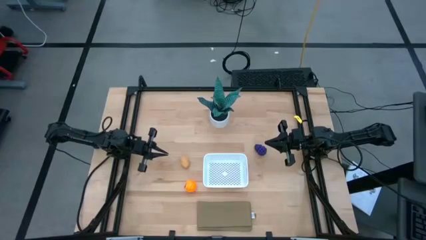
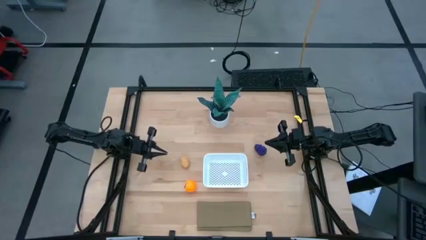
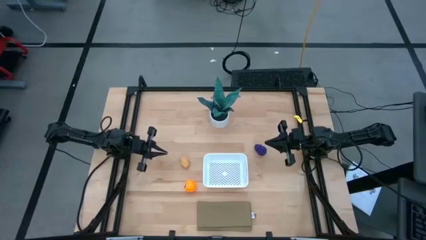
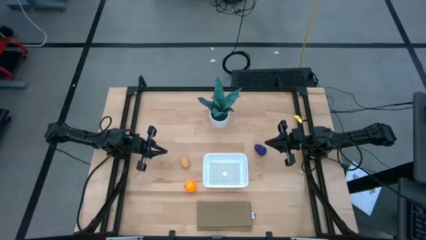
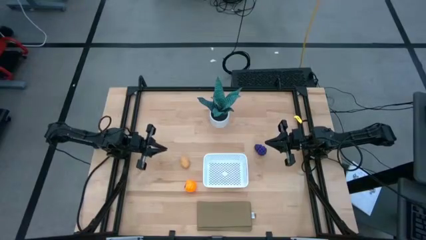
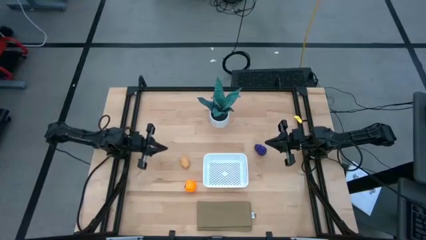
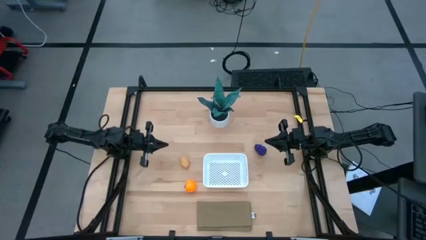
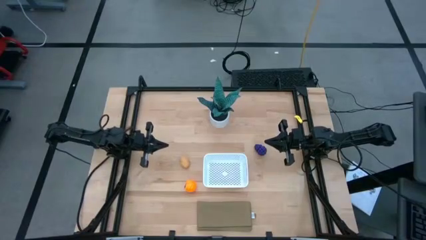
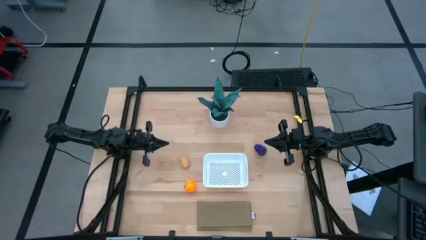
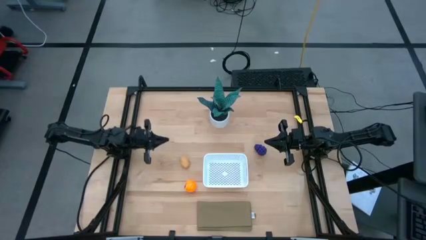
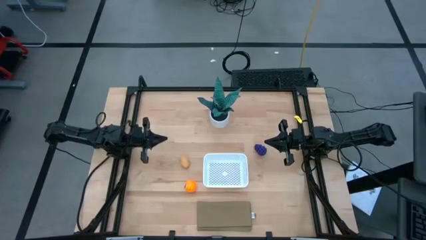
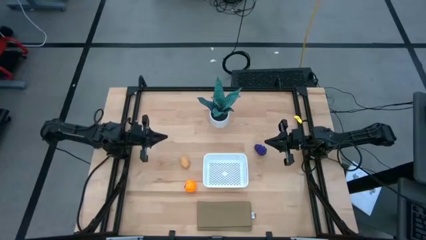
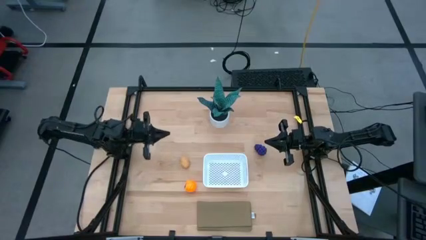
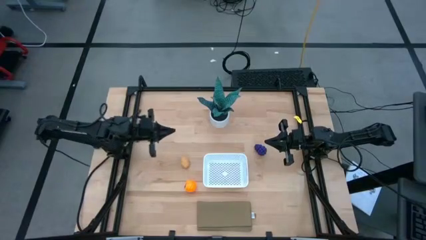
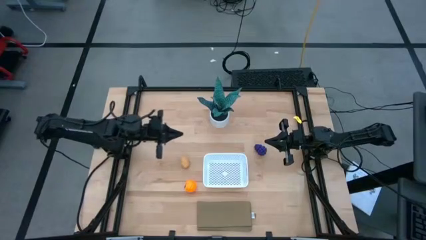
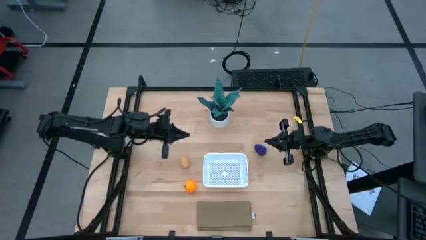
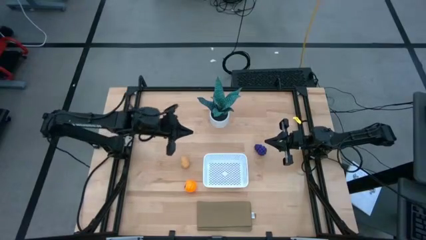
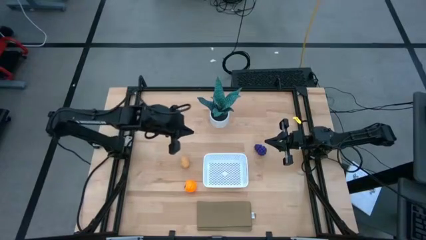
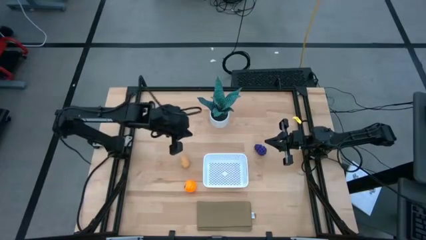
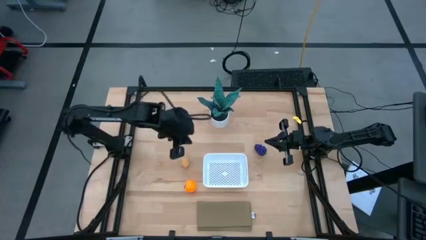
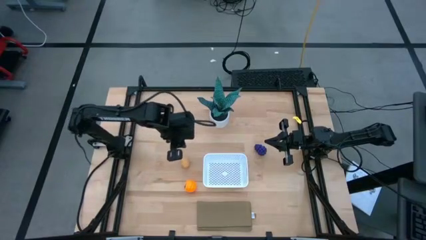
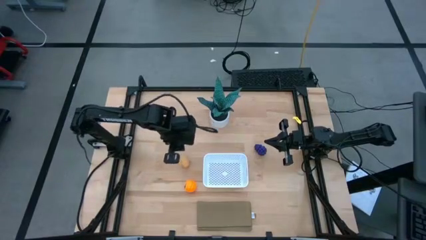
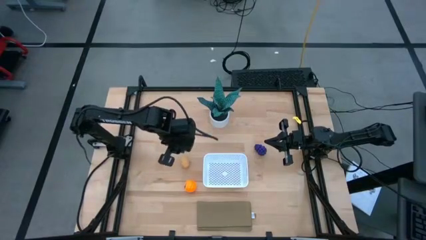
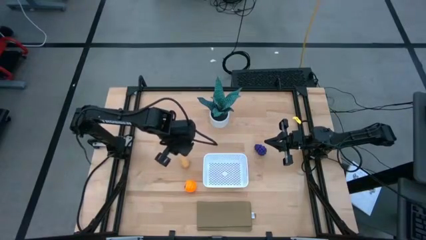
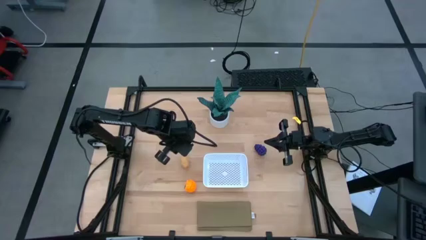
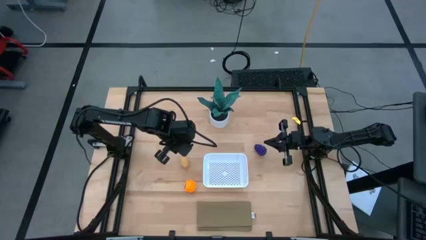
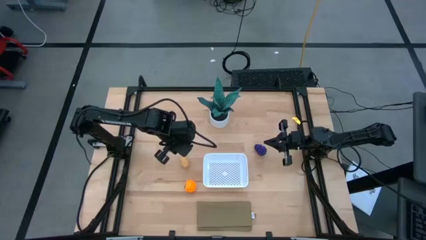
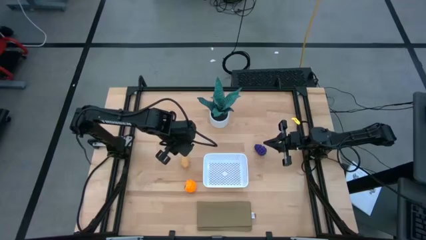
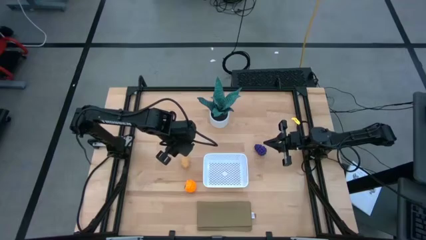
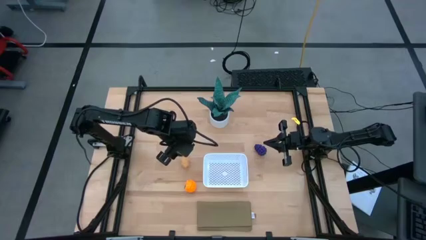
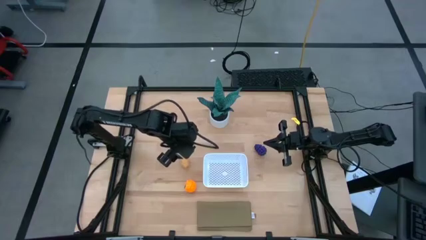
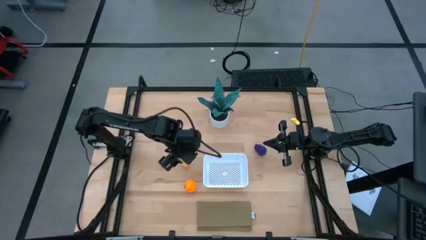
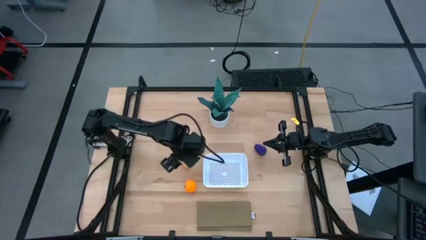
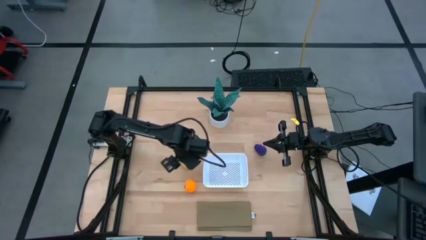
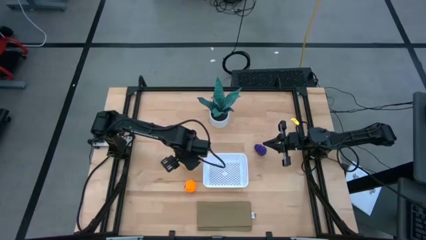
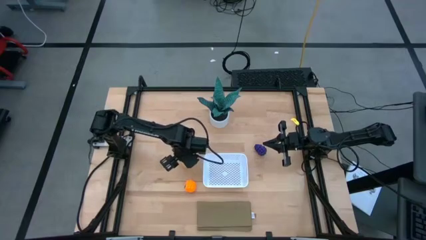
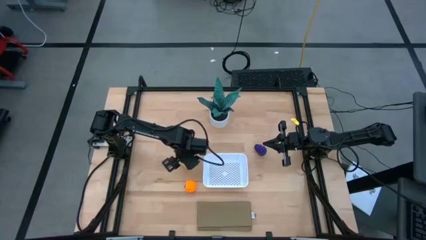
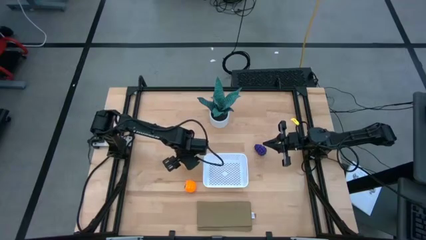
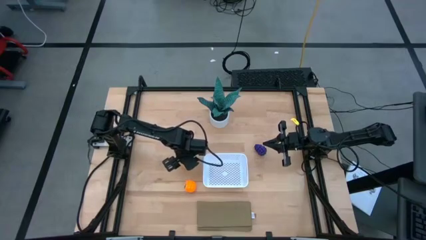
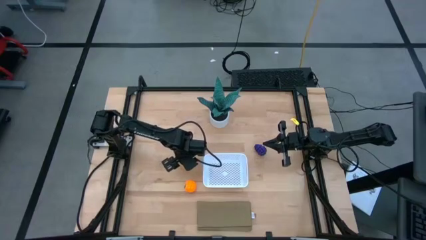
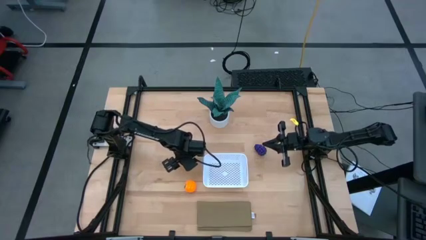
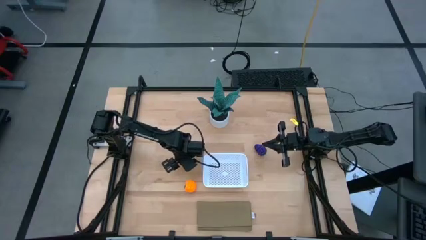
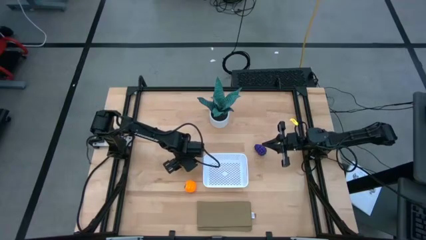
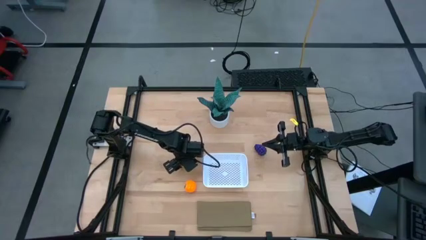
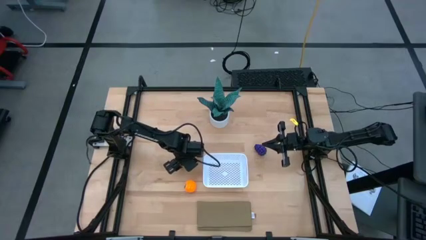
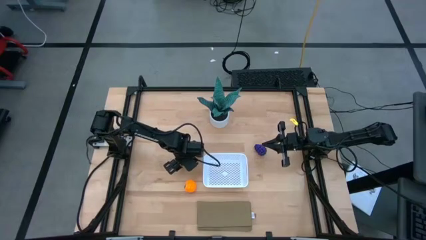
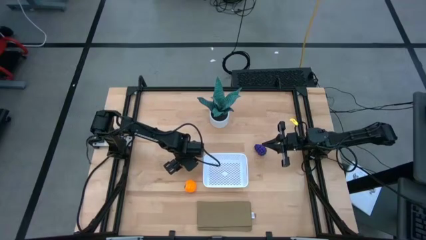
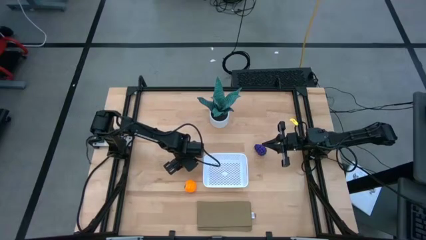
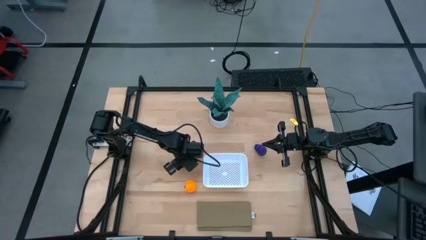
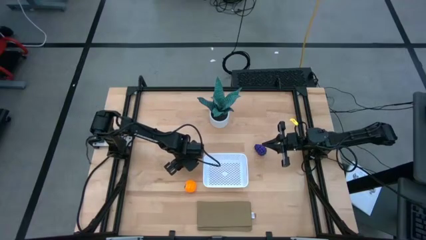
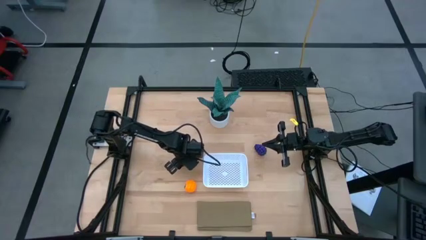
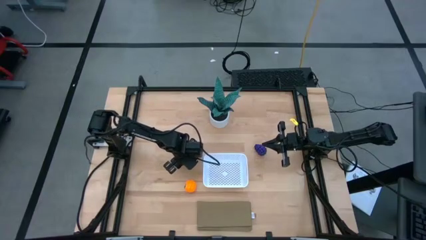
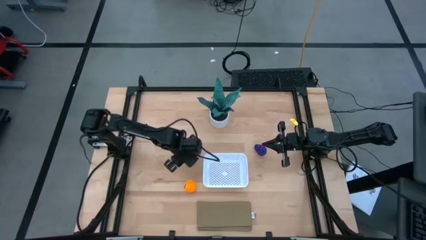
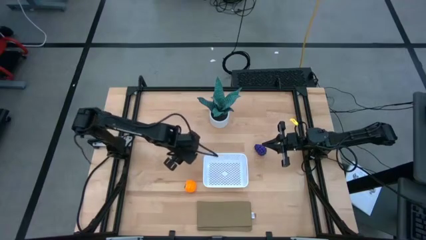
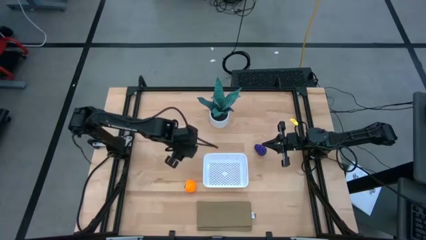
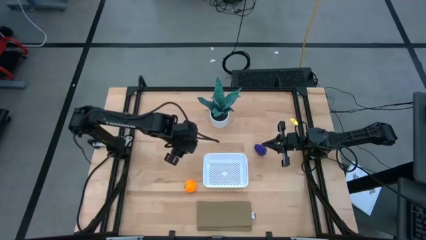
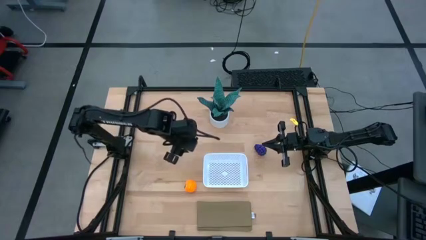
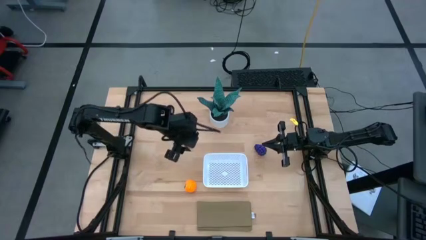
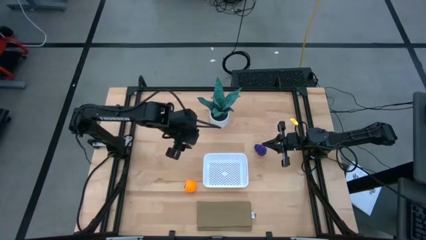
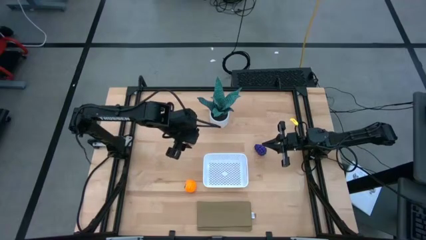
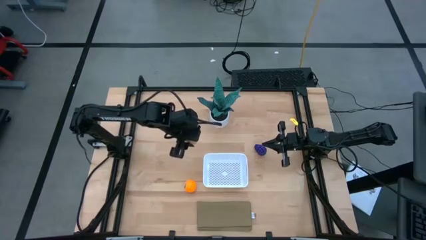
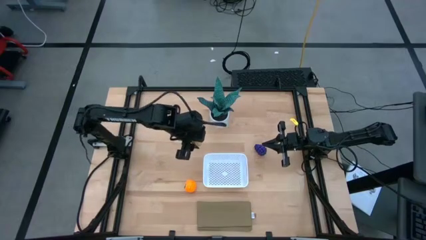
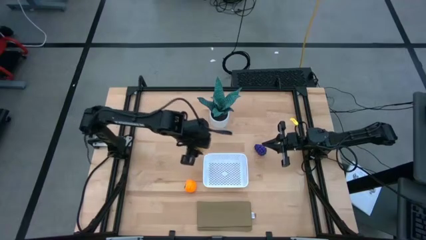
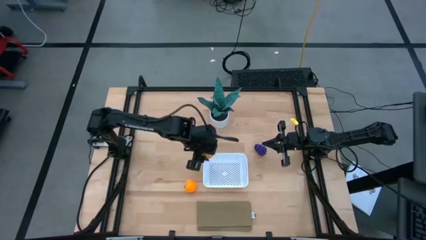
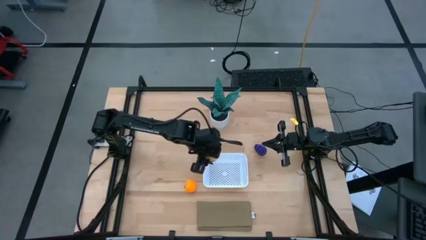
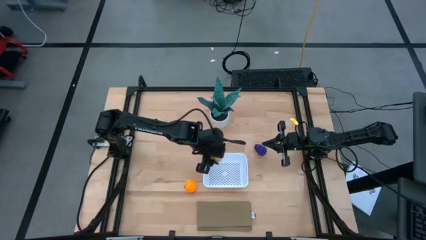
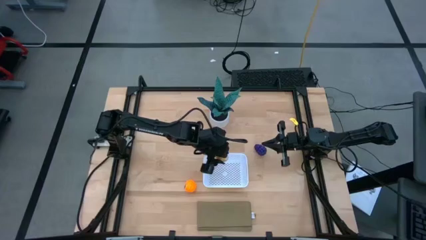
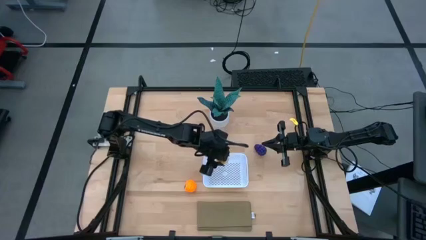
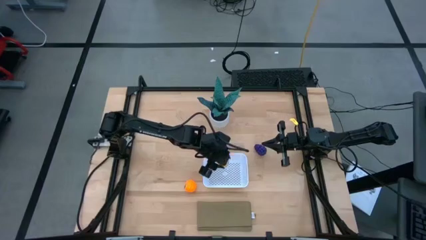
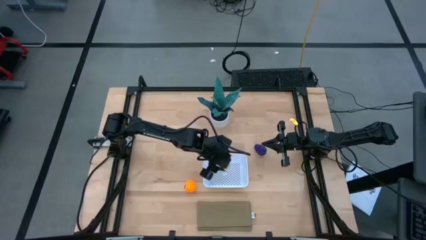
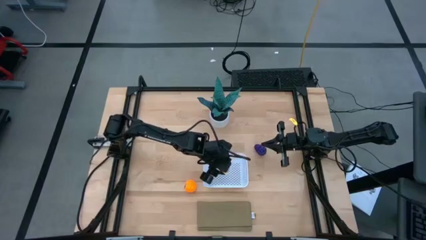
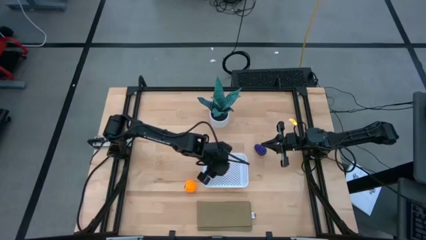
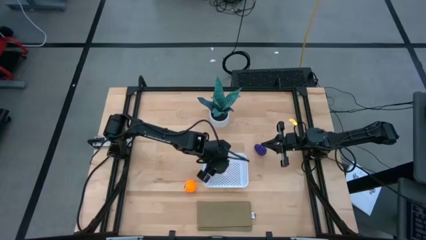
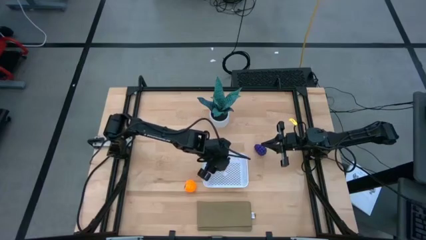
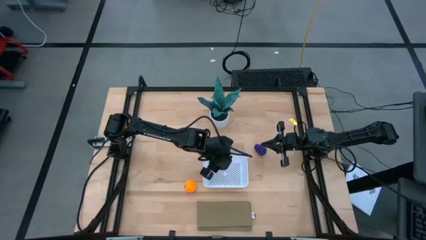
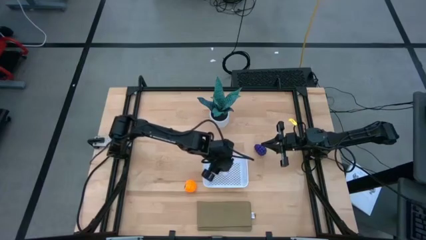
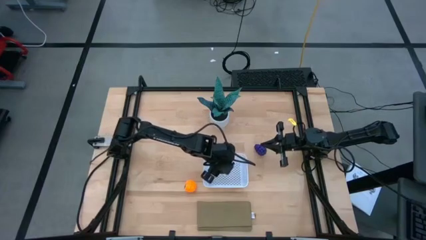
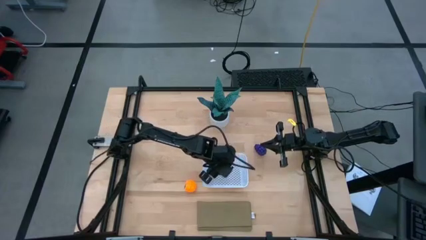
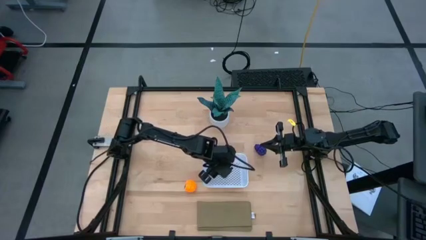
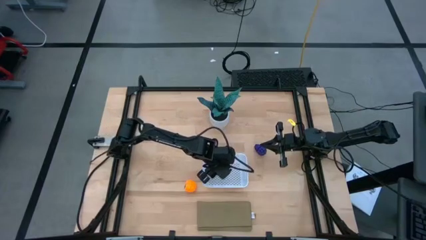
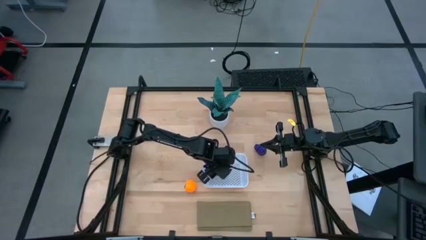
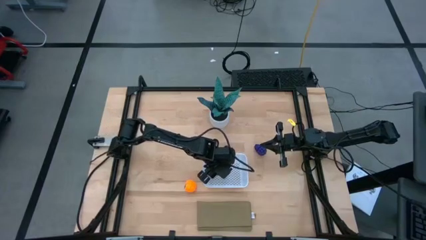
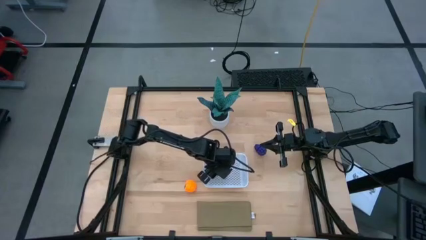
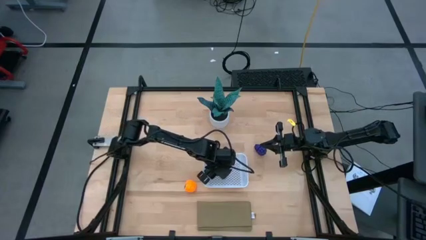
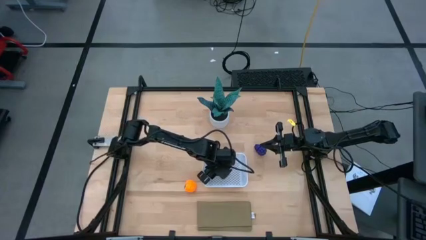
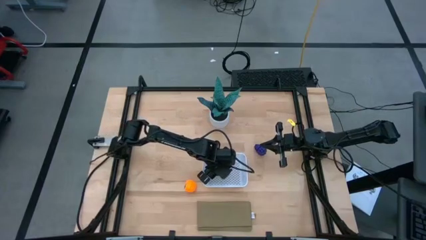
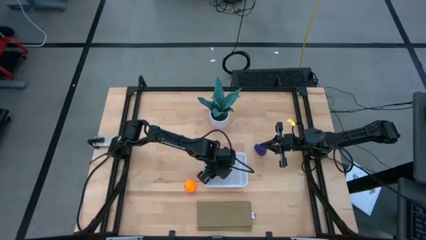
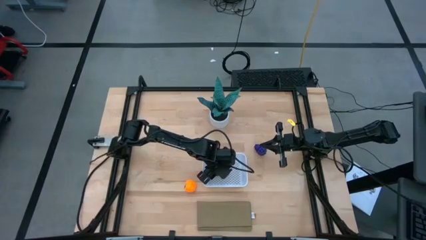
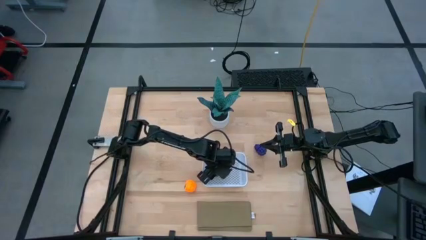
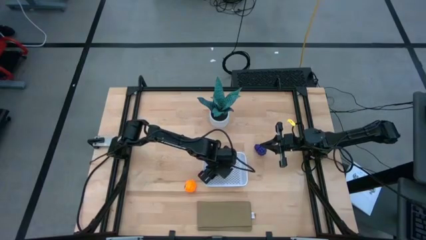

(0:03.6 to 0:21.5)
Task: Pick and placing Produce into tupperware
Put the brown potato into the white basket
